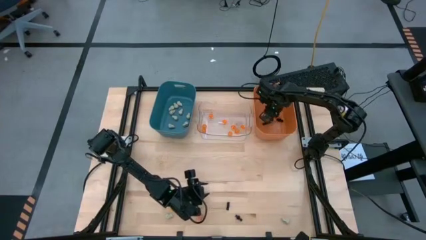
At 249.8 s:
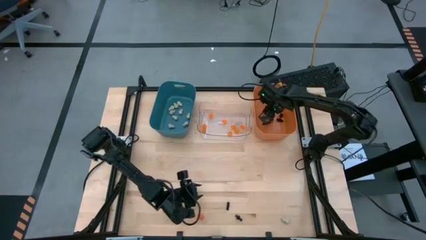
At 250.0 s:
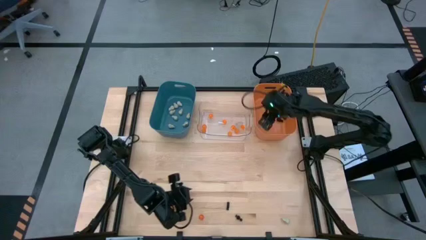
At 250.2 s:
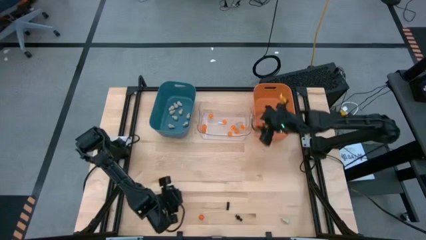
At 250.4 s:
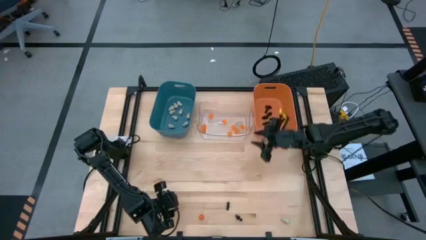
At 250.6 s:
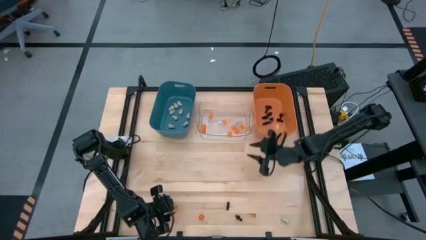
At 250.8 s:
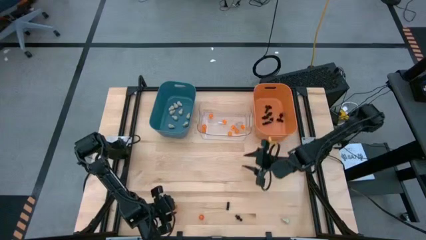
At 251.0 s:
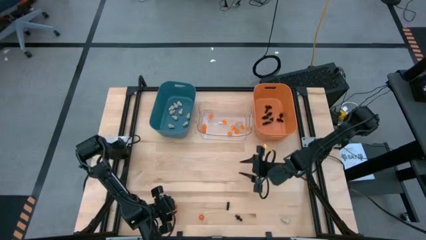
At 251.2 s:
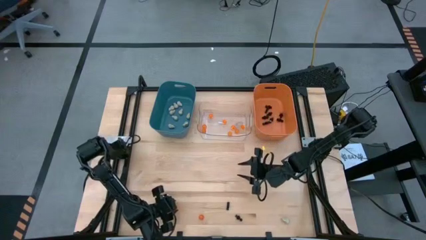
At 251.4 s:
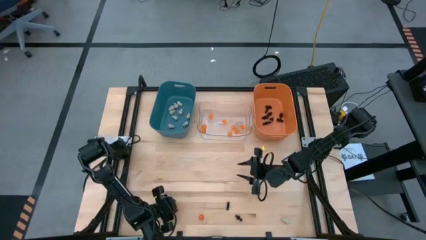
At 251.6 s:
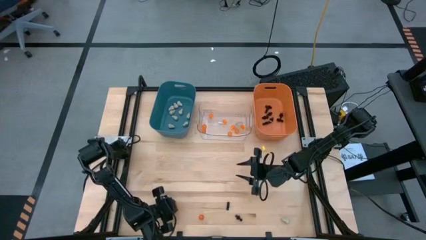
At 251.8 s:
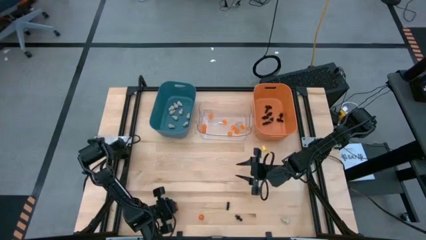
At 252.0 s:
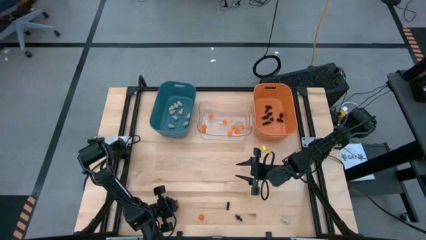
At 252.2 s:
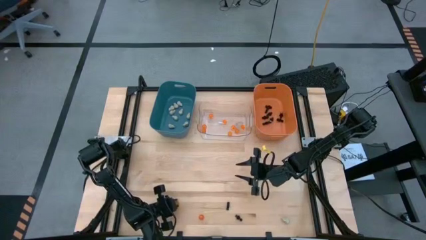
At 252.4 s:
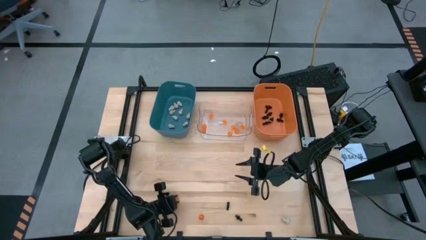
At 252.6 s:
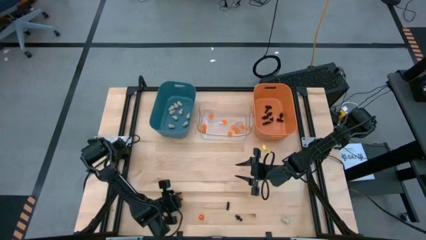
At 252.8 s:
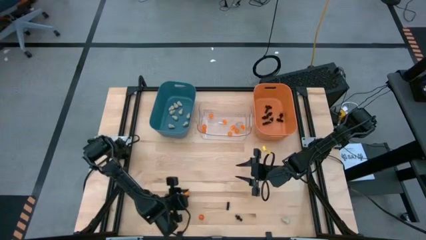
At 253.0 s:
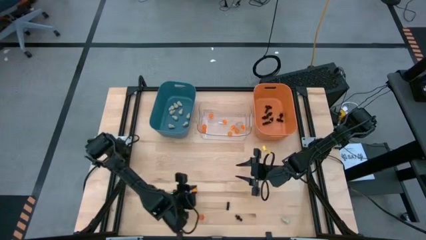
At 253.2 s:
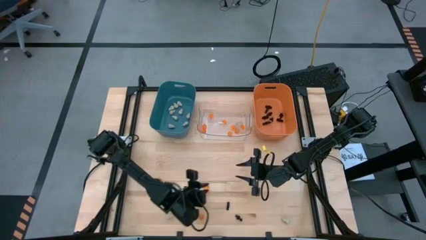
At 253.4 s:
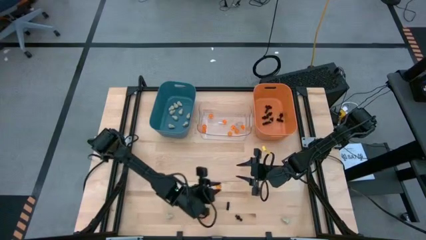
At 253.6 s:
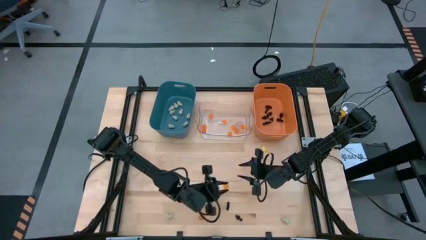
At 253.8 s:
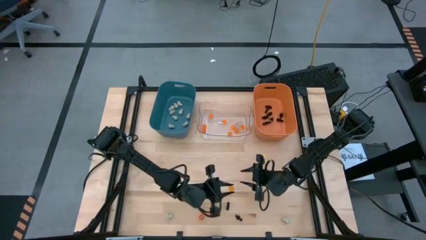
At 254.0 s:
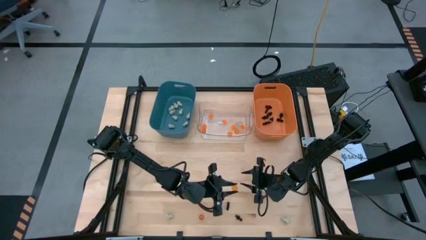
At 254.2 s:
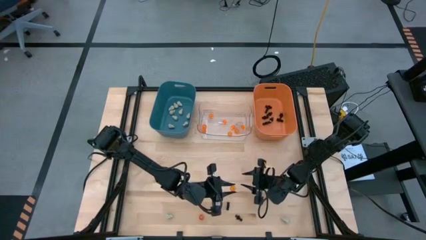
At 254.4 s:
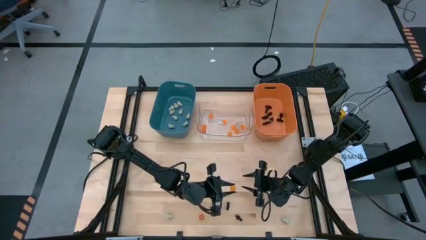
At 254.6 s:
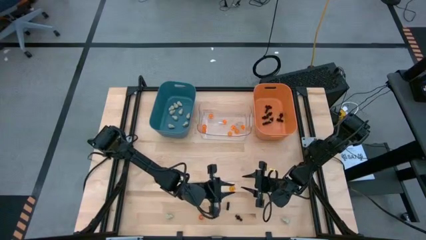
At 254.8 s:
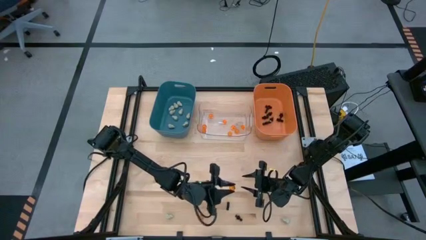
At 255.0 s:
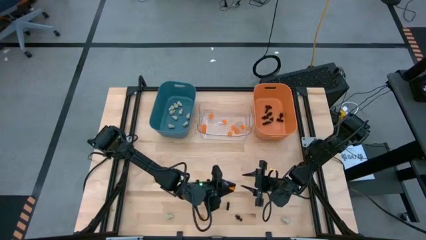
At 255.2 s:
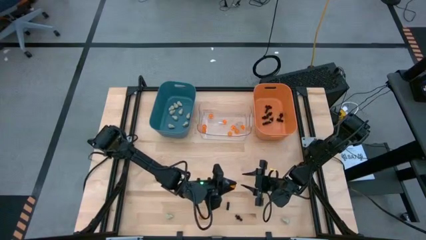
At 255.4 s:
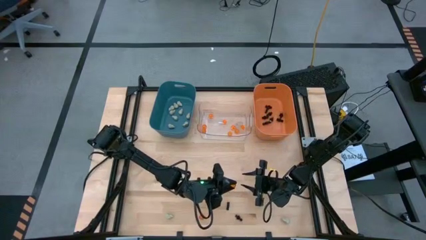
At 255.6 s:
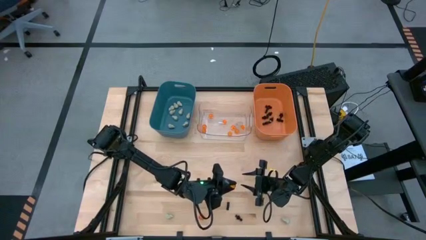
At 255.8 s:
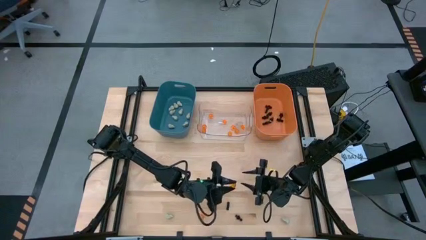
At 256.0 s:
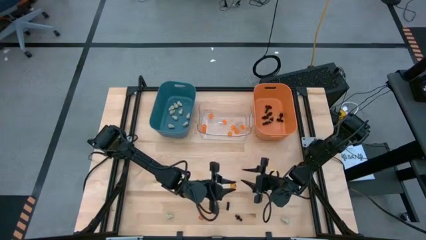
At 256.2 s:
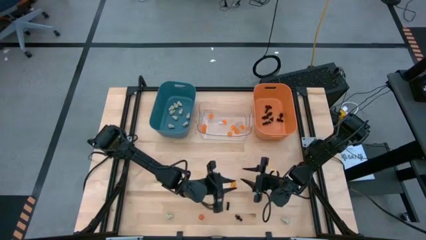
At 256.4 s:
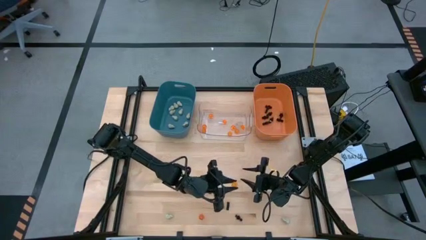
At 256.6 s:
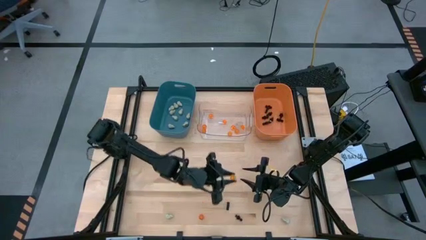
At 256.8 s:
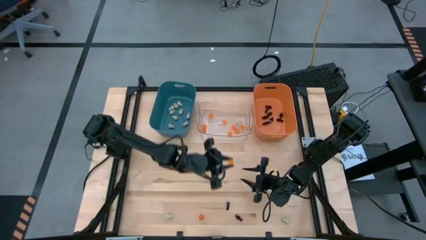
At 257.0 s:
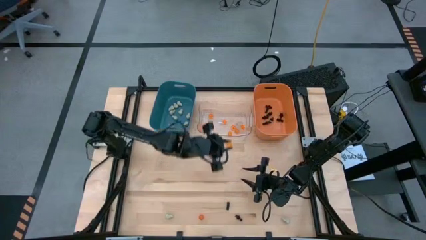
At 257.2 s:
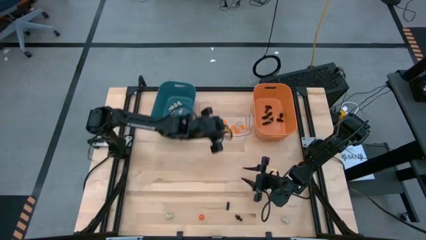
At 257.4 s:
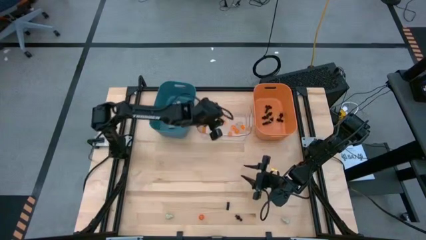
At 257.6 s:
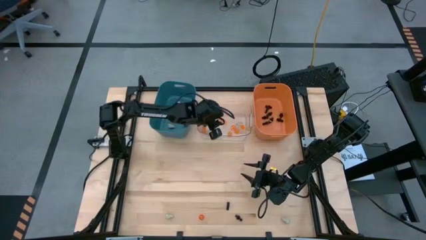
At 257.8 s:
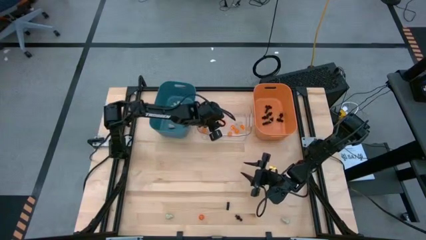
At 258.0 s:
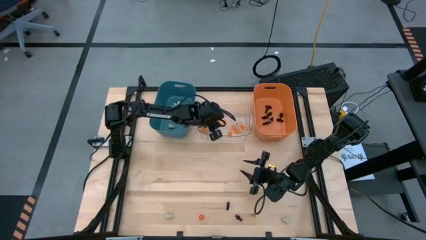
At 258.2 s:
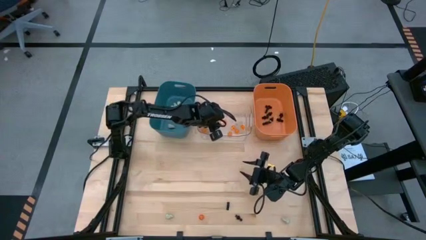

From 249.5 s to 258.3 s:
Task: Sort Halloween decoration
Put the orange pumpkin toy into the transparent bin

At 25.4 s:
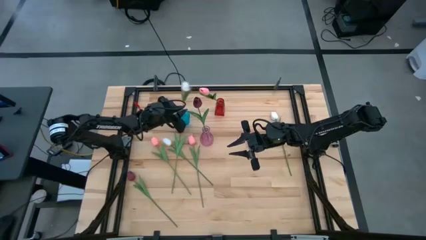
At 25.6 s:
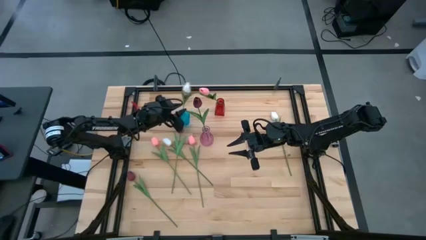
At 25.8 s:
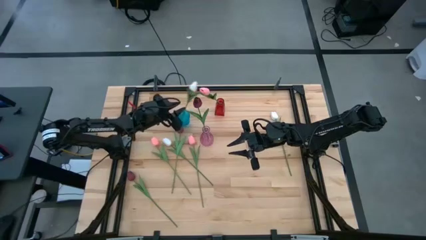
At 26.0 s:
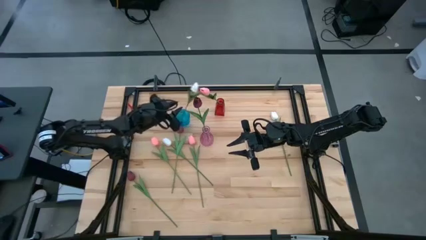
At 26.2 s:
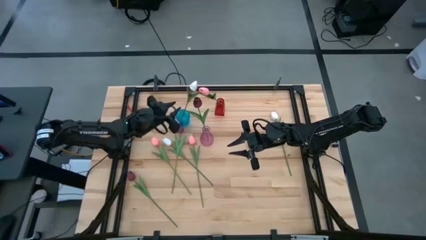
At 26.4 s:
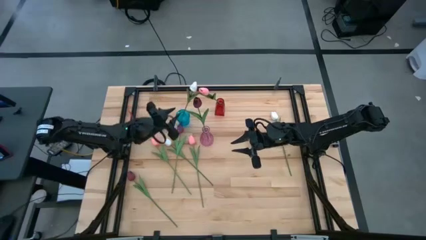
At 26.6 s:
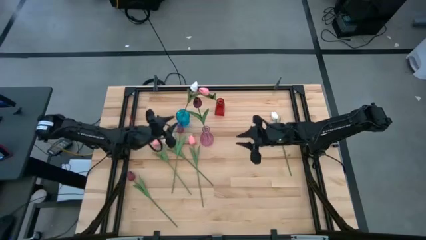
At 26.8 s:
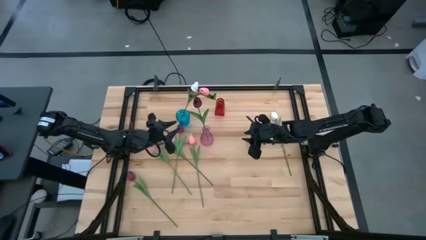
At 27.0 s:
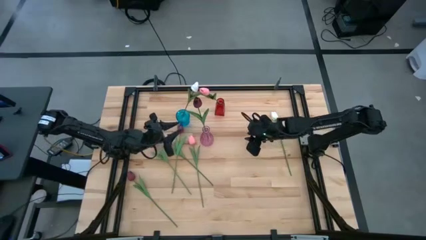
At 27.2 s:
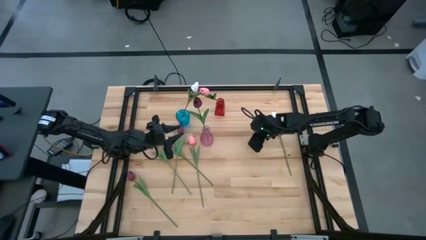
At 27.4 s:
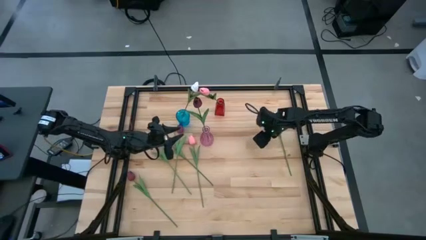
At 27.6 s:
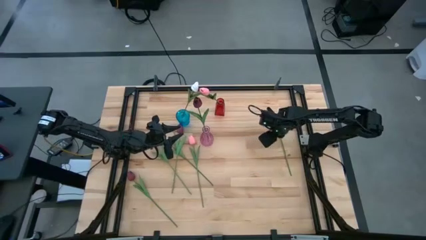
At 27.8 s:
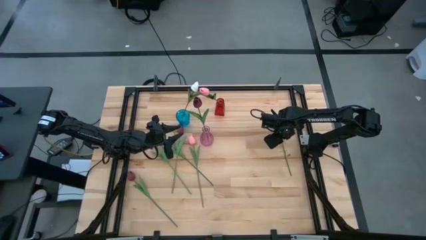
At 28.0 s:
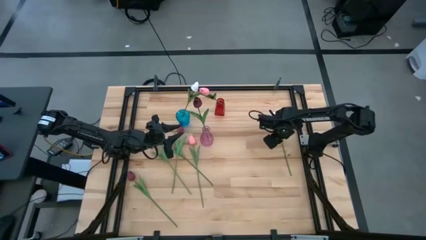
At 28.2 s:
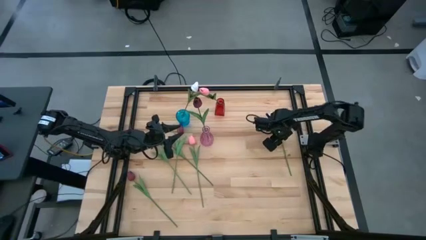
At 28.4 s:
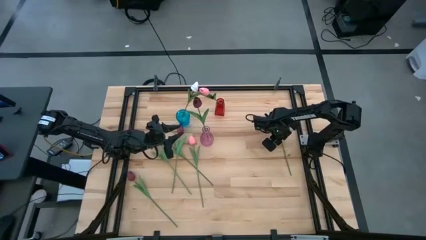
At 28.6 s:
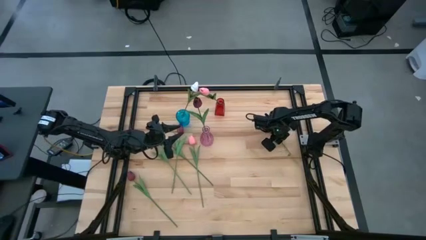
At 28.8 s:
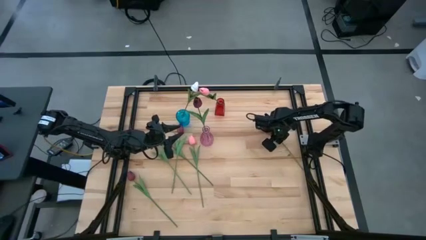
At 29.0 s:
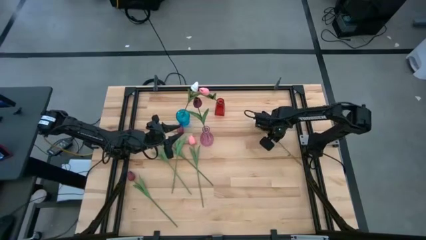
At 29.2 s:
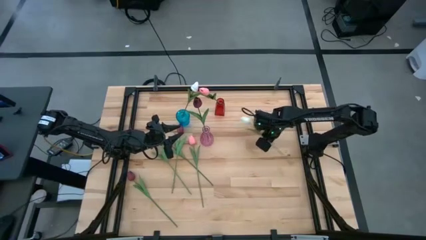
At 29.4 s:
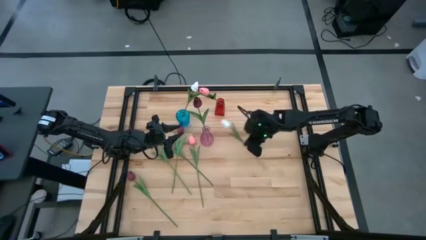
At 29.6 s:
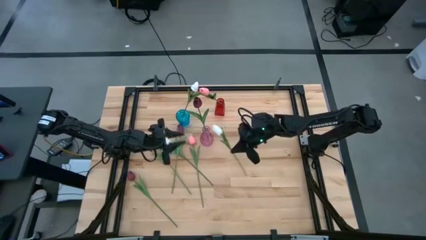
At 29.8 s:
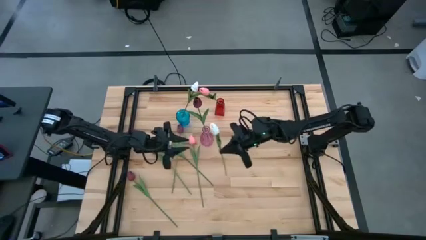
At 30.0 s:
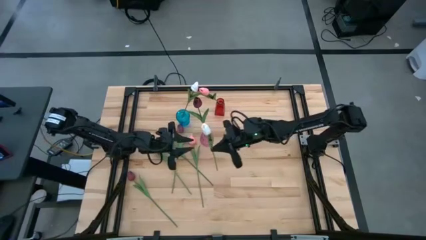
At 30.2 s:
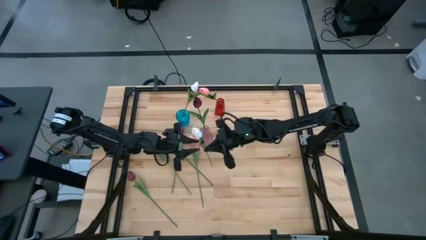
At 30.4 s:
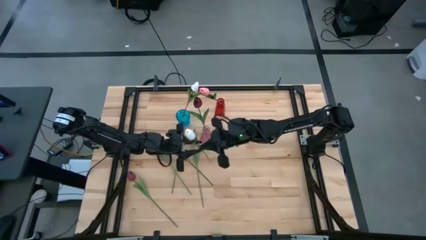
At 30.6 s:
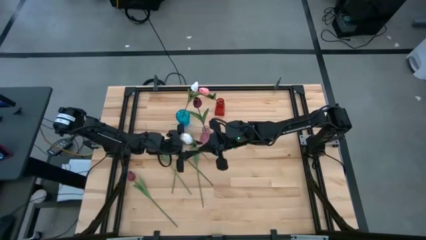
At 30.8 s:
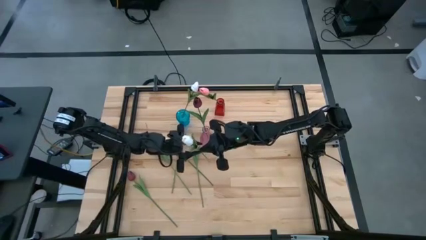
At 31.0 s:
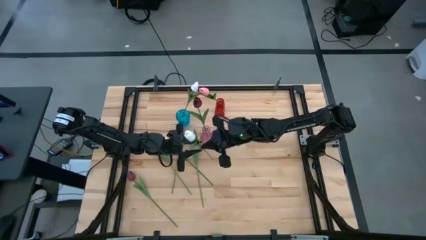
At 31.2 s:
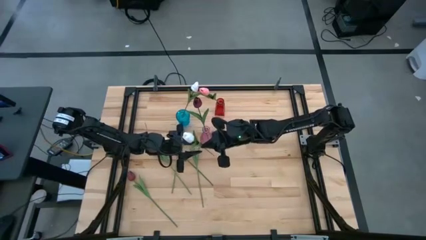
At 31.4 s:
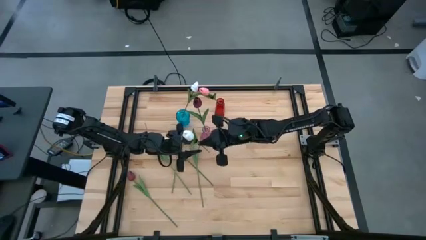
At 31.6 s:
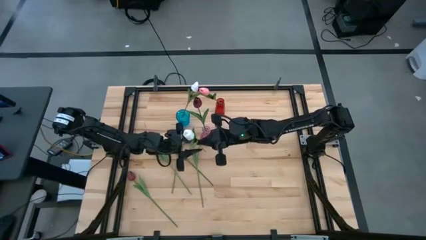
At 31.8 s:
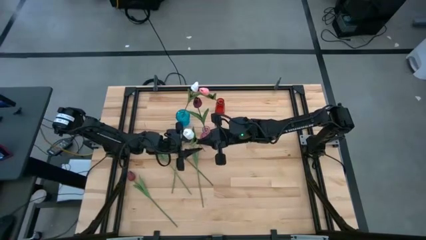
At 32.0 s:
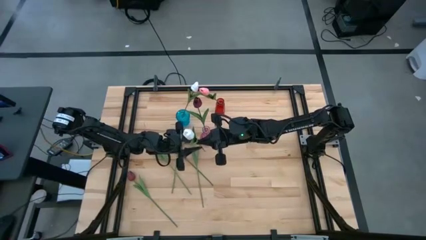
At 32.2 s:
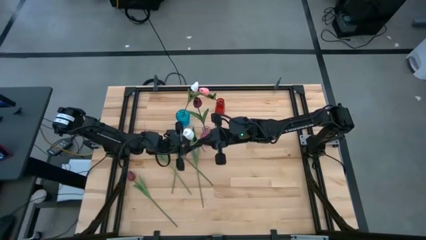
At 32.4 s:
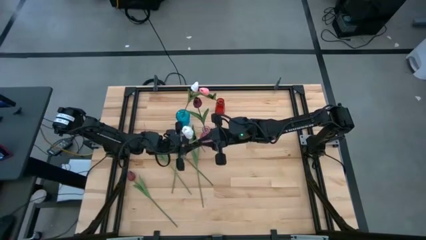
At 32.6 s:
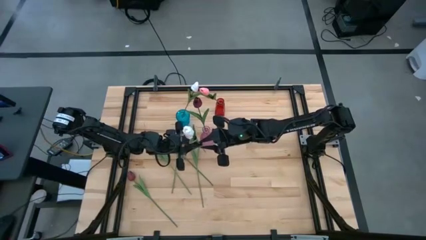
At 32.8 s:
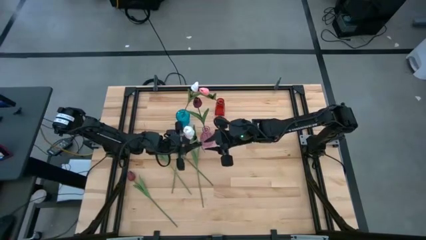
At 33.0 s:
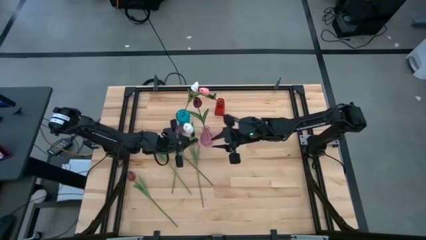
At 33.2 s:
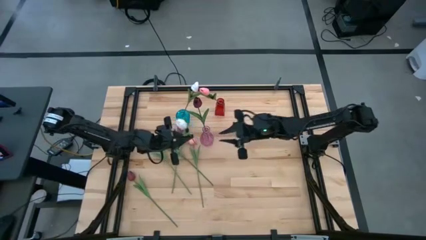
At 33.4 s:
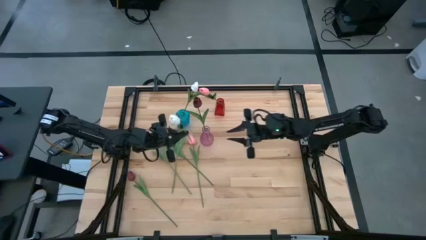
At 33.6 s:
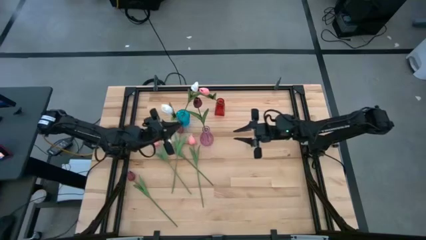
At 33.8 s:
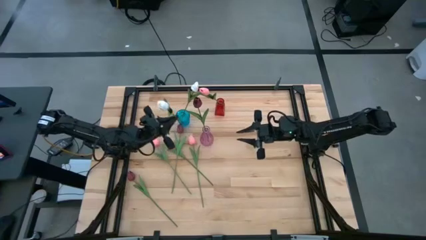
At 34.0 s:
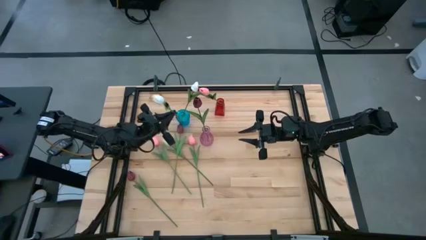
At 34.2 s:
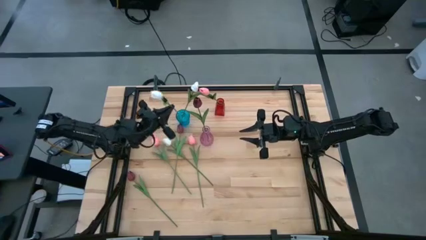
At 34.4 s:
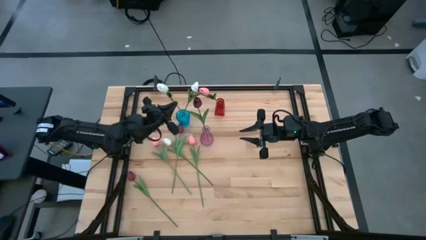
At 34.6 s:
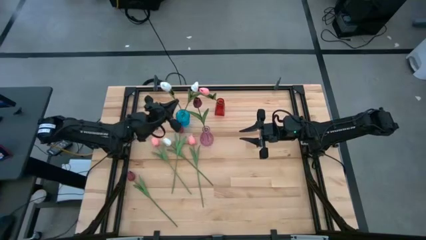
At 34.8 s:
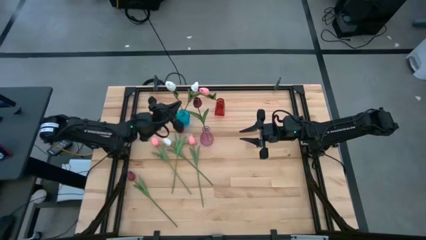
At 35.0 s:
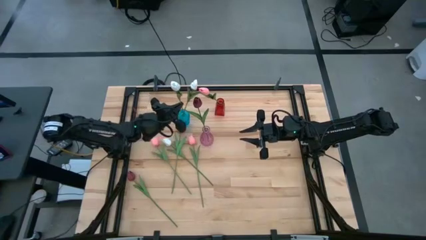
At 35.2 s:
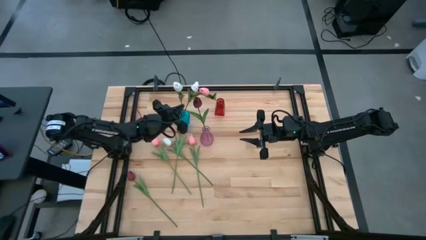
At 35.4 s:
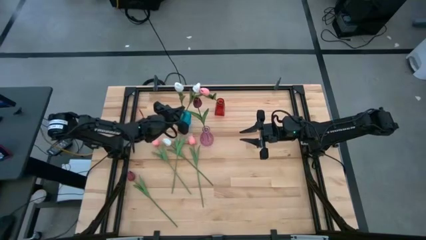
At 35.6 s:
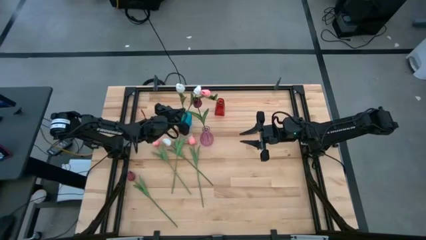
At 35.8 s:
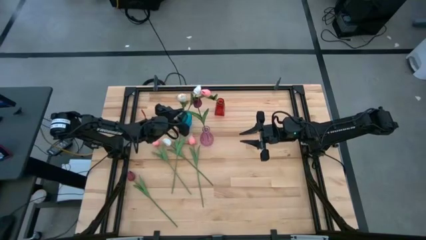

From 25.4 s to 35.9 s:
Task: Sort flowers into vase by color
Put the right white flower into the blue vase
